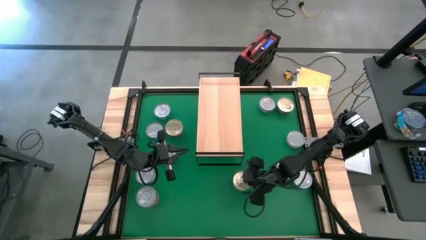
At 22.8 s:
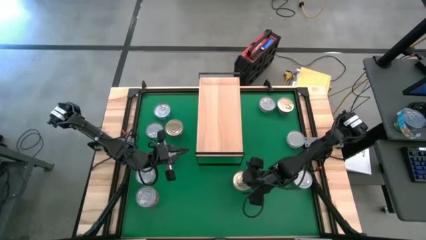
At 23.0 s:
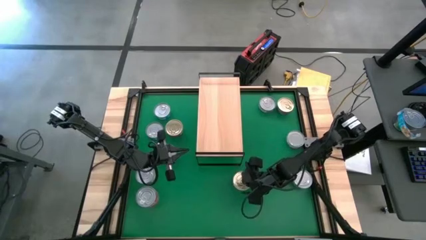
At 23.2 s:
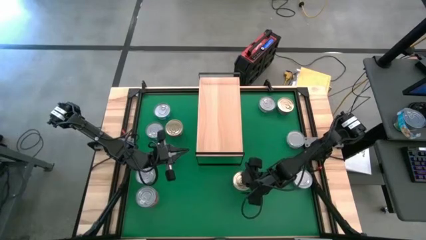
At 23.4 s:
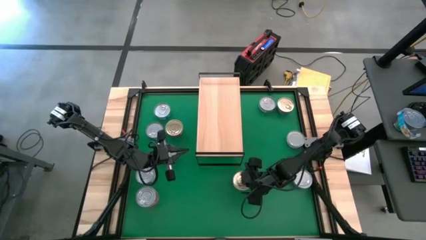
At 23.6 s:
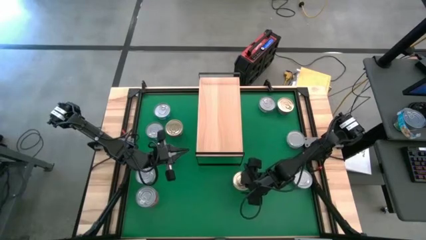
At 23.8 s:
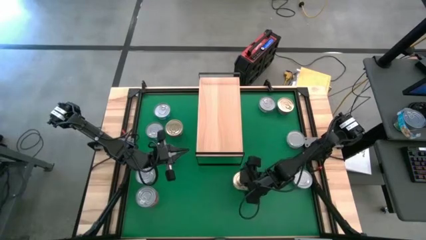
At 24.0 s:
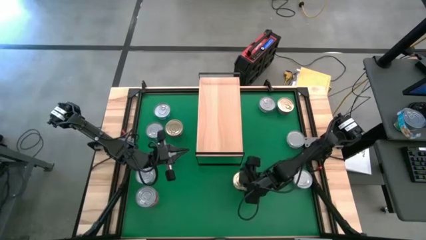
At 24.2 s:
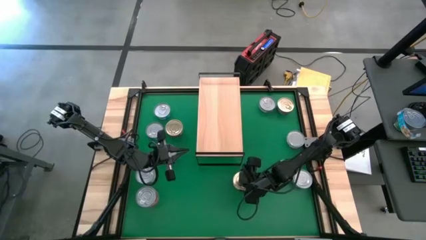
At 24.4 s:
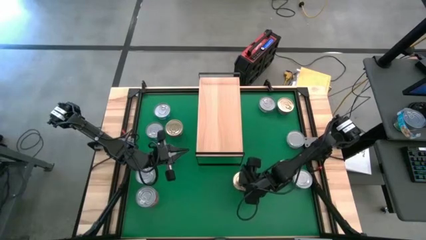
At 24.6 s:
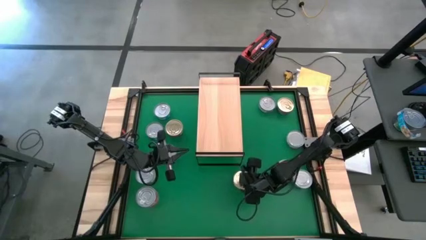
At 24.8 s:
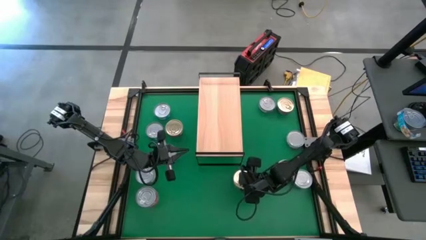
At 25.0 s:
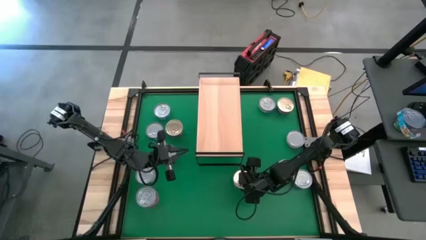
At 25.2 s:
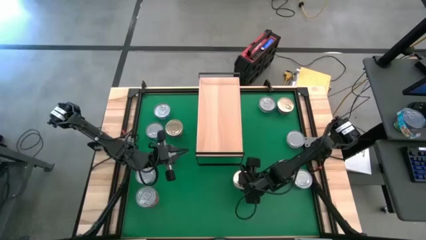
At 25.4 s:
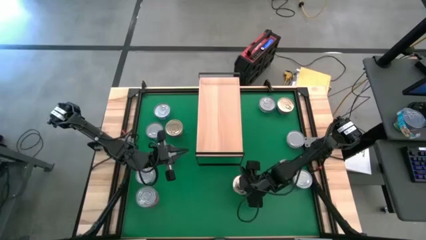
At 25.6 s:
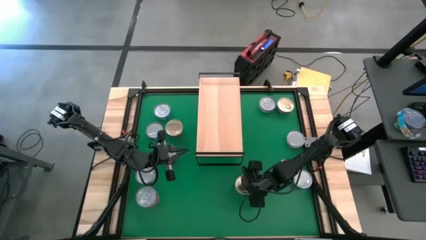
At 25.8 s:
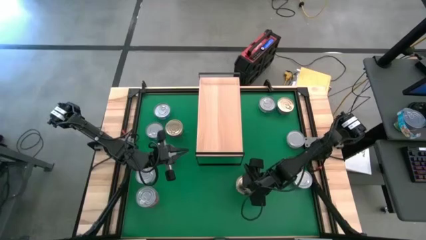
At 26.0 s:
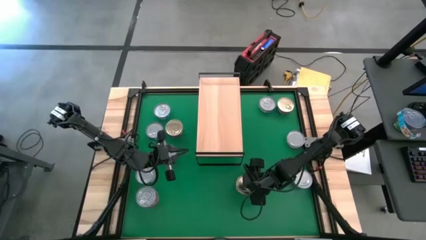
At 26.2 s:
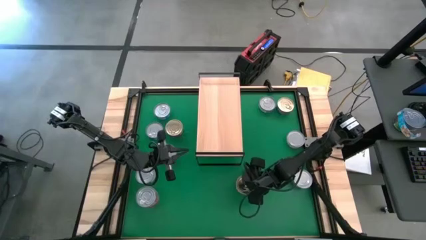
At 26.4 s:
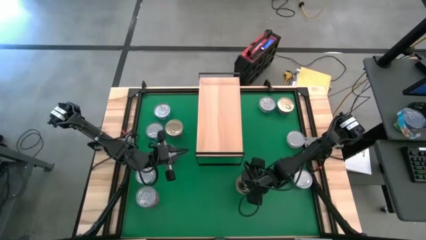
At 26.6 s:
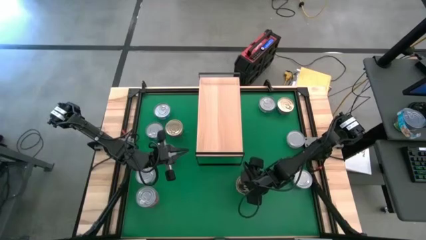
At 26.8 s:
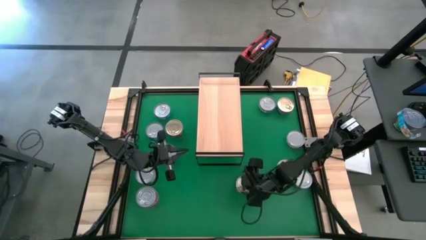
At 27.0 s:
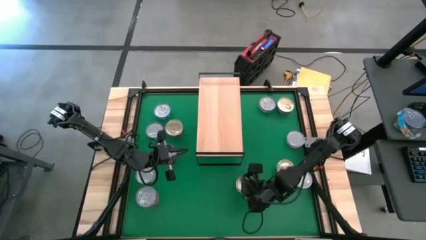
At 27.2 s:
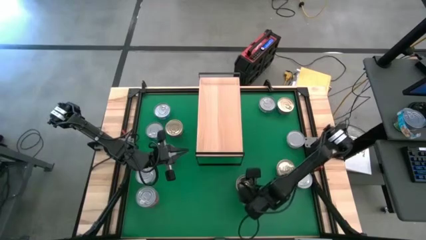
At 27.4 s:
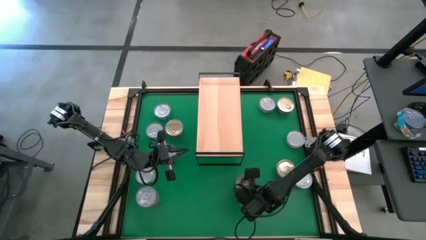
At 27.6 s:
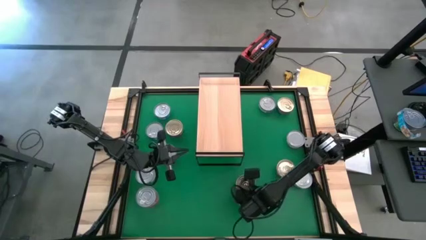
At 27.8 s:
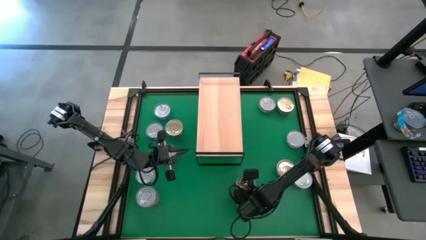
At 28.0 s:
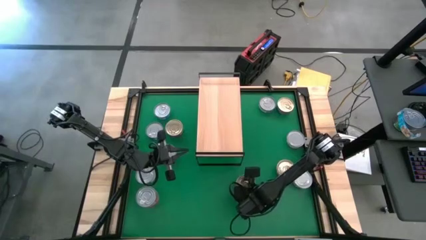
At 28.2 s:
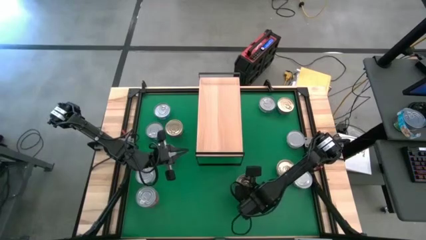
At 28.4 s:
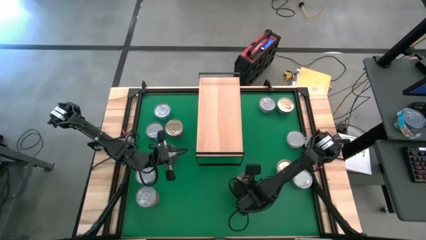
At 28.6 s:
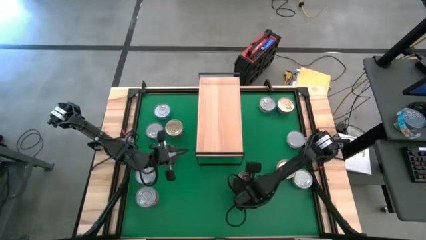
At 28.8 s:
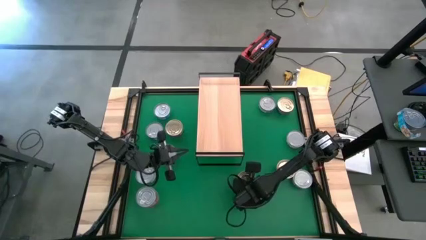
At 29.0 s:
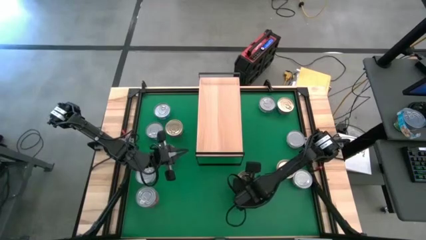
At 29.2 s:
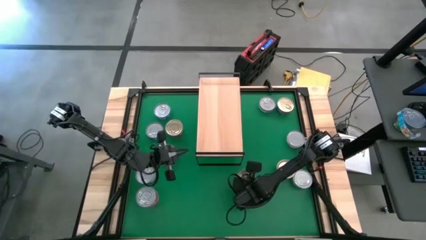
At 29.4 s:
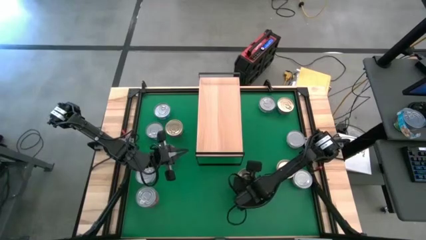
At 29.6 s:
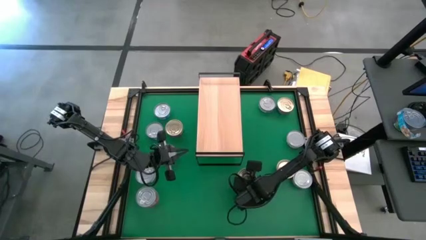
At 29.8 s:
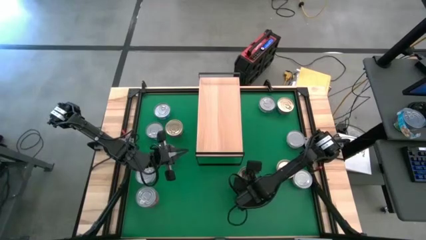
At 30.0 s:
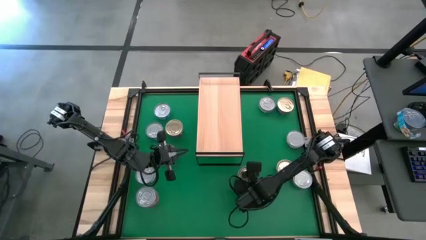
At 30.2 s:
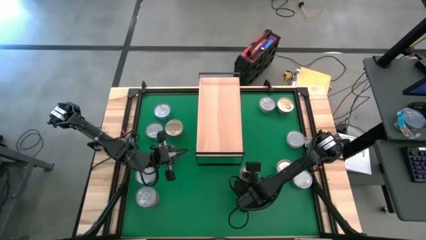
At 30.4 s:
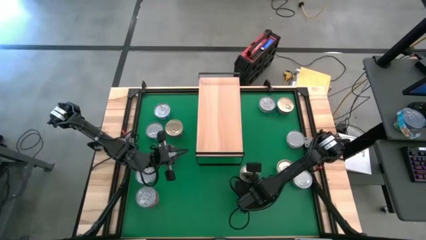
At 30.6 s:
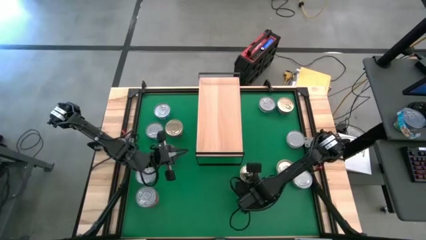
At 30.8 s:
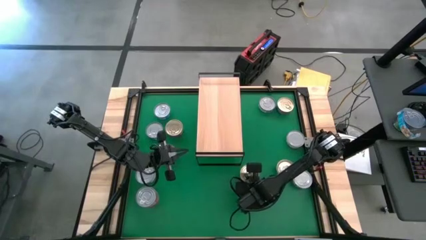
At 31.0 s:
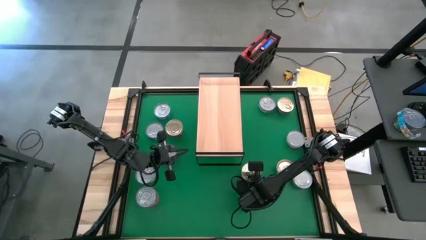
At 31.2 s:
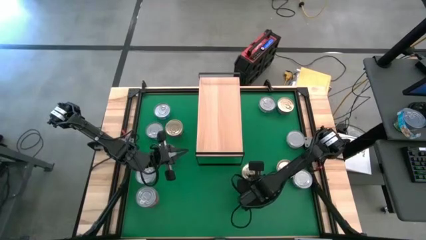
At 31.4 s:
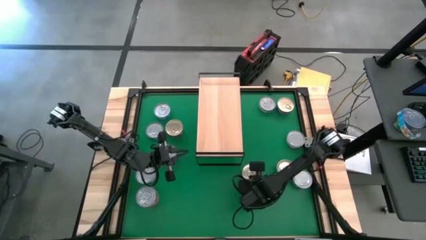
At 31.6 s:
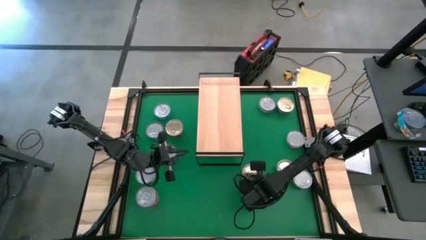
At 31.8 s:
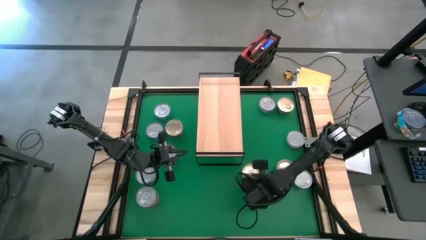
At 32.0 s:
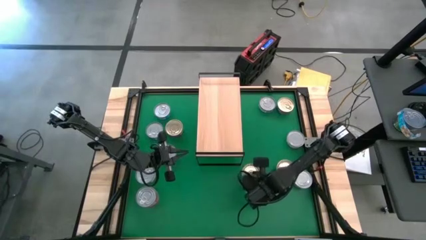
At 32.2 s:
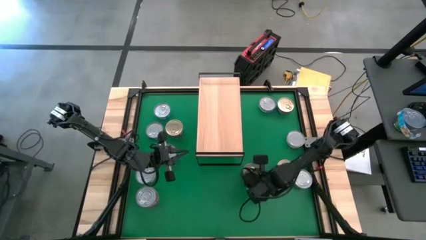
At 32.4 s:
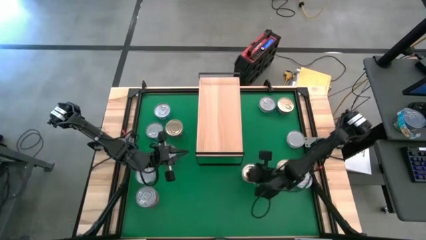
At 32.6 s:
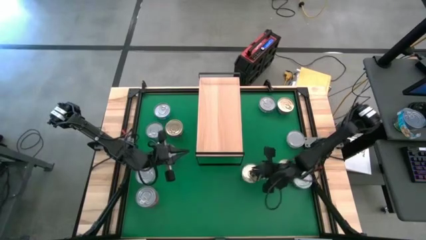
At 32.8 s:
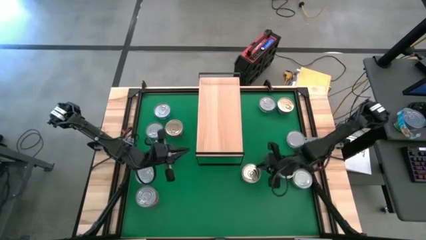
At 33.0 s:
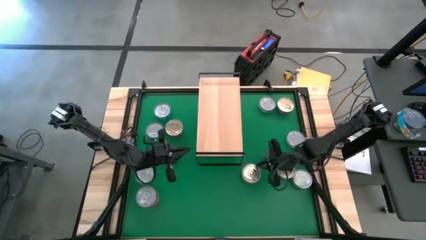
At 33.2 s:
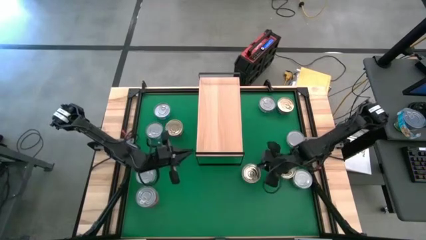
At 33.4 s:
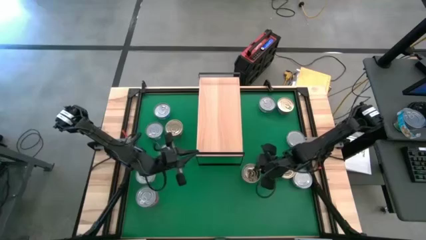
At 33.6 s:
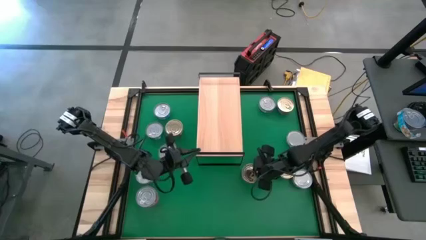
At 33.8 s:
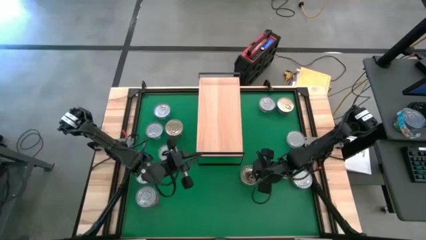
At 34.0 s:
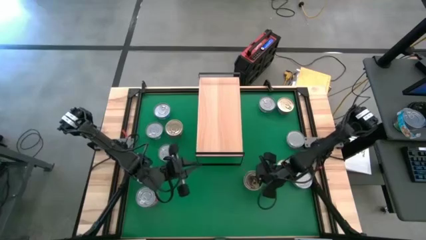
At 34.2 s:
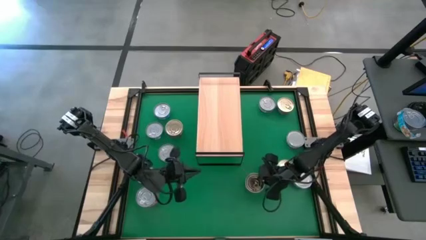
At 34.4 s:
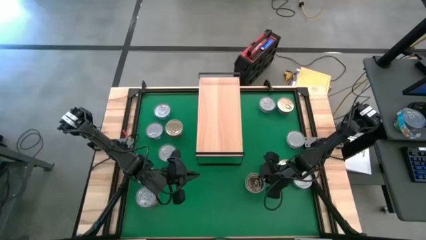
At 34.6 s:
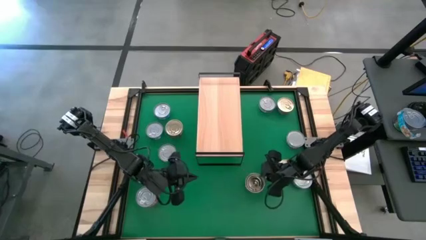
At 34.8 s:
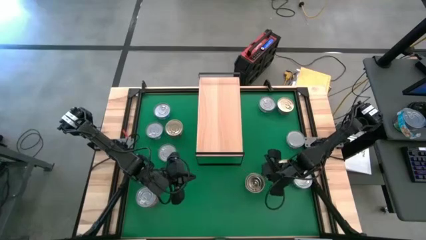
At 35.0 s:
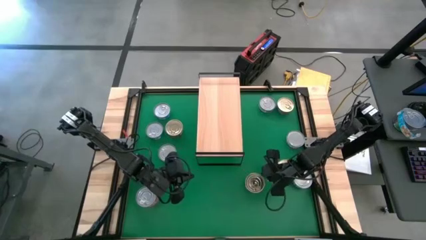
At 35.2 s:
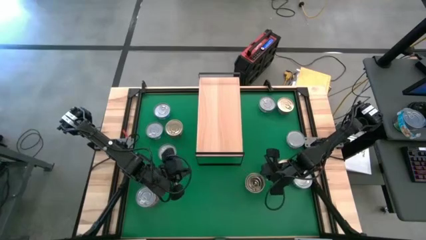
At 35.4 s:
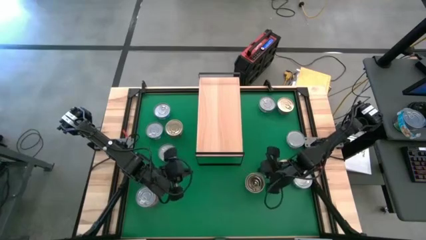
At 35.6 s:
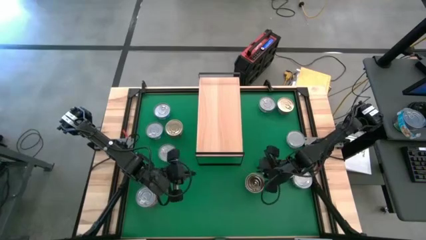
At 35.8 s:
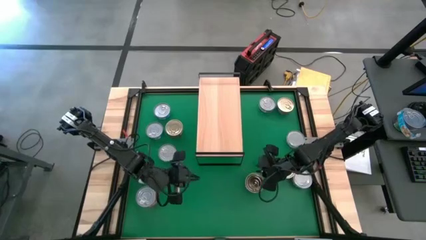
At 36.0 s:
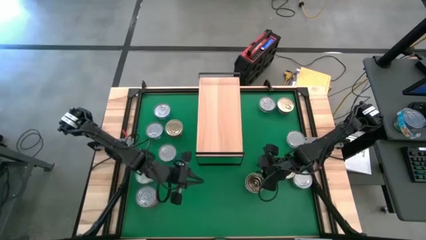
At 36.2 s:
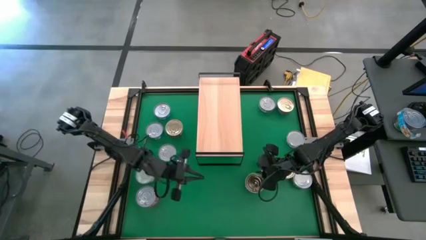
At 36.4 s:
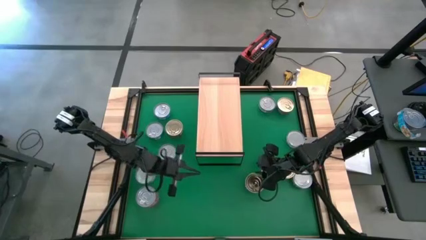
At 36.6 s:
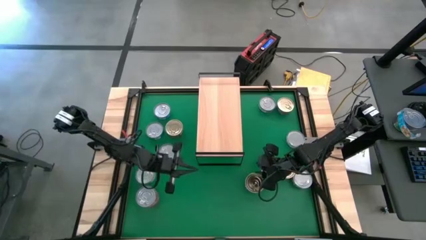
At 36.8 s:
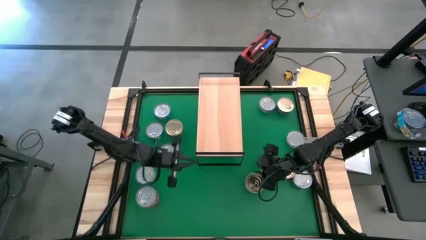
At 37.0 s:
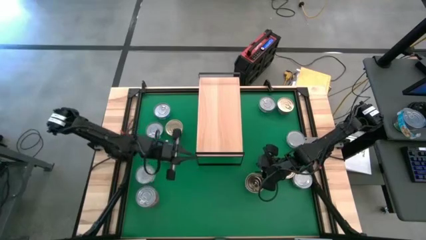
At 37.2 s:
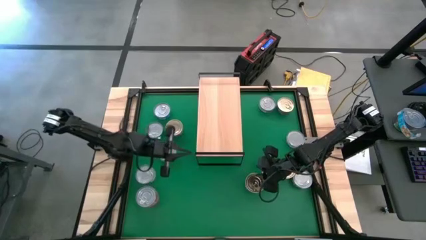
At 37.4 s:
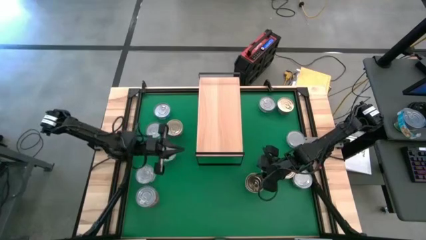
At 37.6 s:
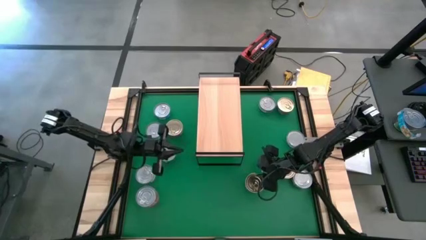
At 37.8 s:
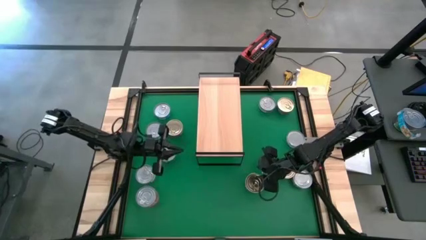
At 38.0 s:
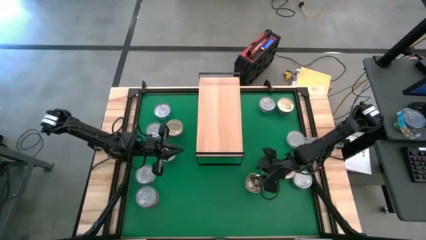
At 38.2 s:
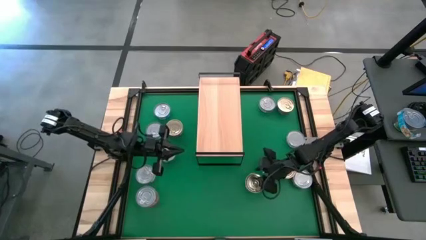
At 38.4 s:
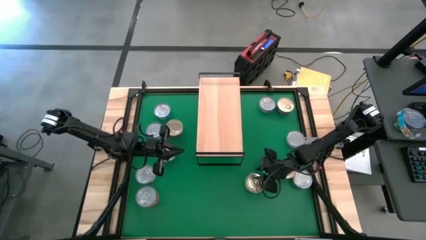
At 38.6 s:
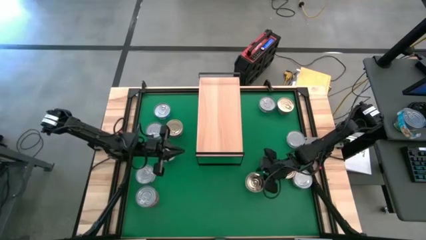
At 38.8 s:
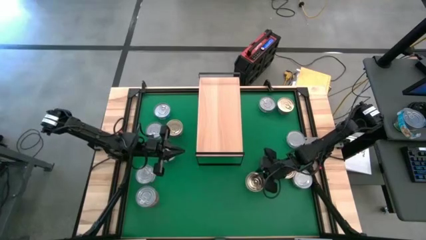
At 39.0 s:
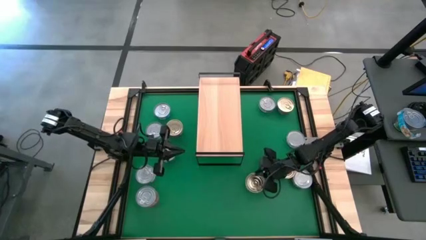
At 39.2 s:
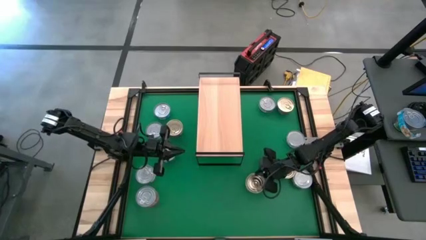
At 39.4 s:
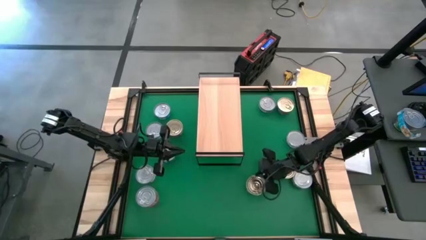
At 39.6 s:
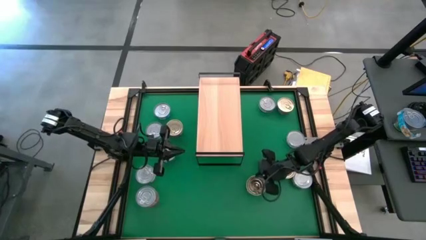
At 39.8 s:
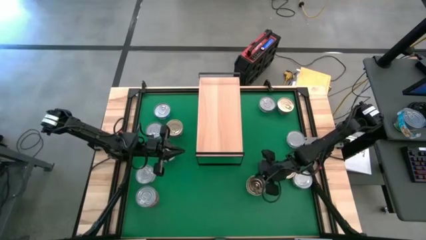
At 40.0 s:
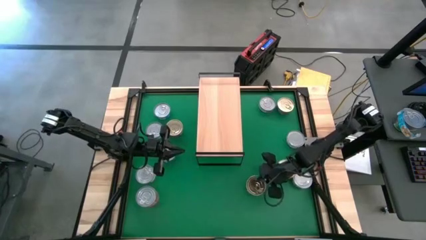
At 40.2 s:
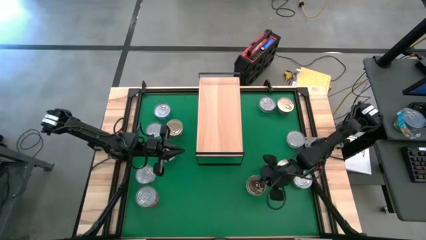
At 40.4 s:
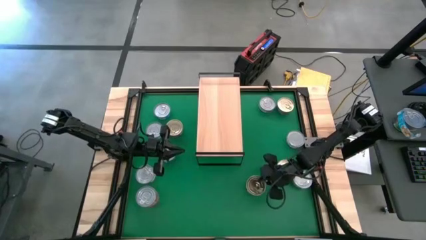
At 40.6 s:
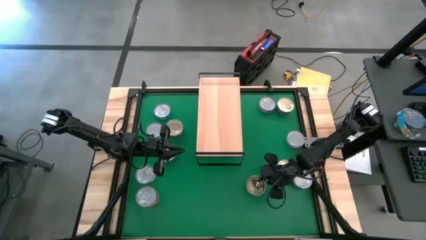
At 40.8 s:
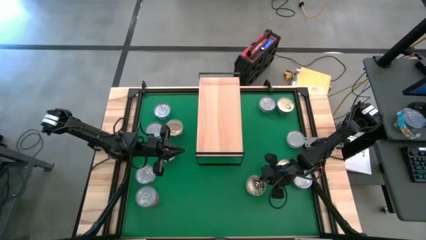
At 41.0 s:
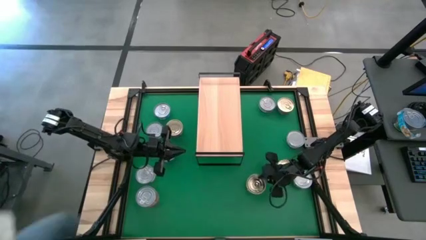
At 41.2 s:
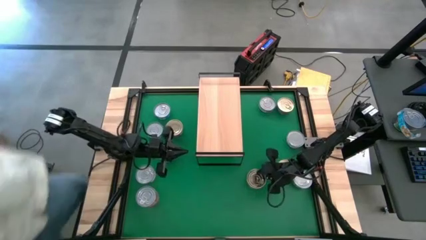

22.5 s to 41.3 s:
Task: Stack canned seafood by type on shelf
Put the bottom center dark blue tuna can on the shelf
